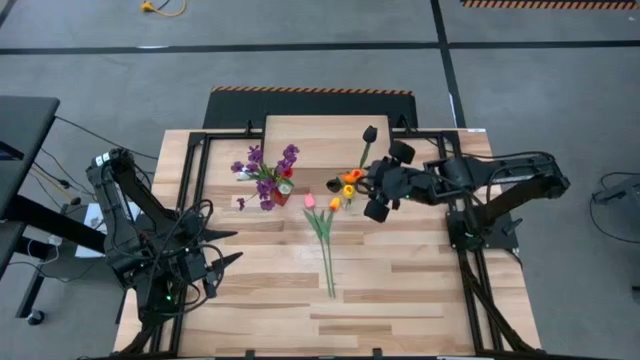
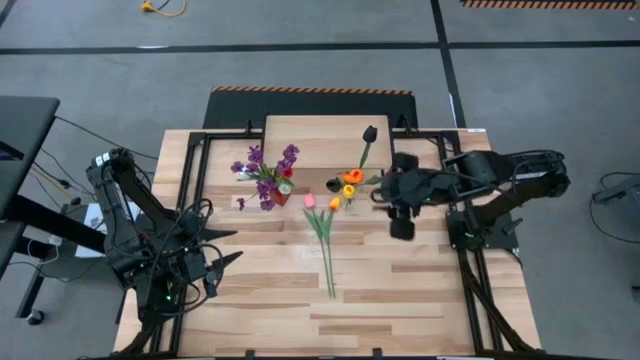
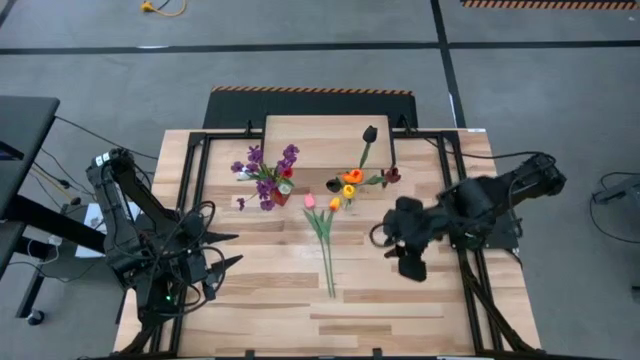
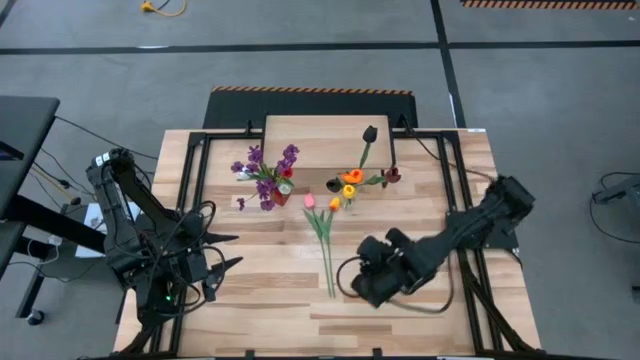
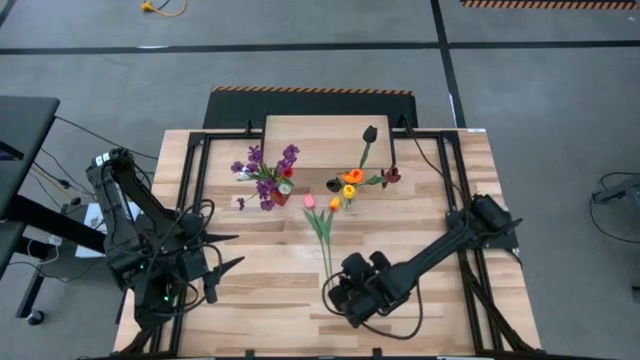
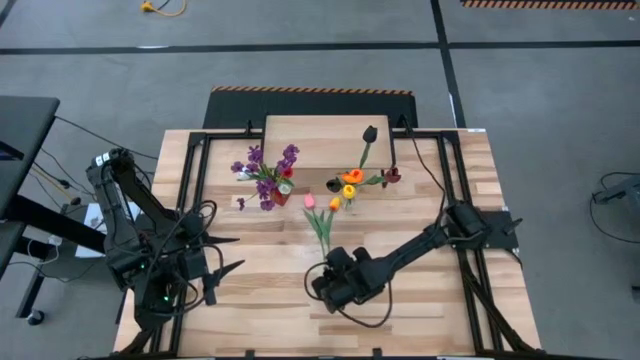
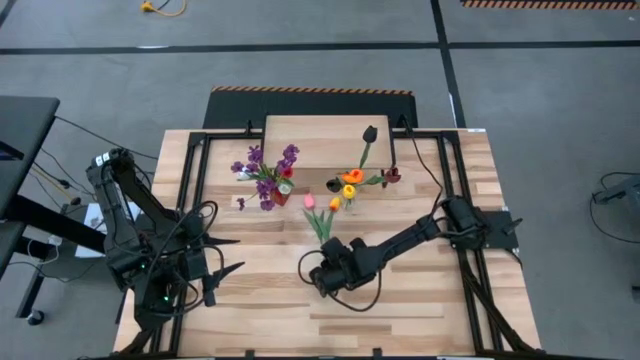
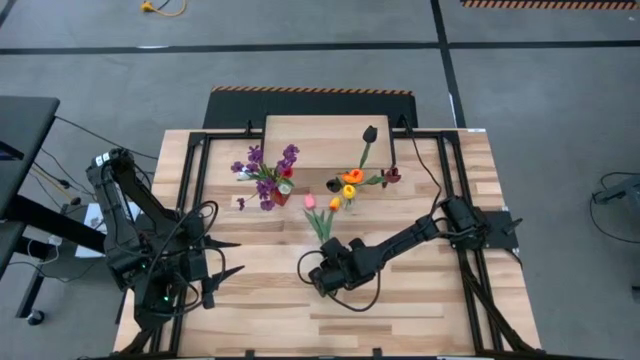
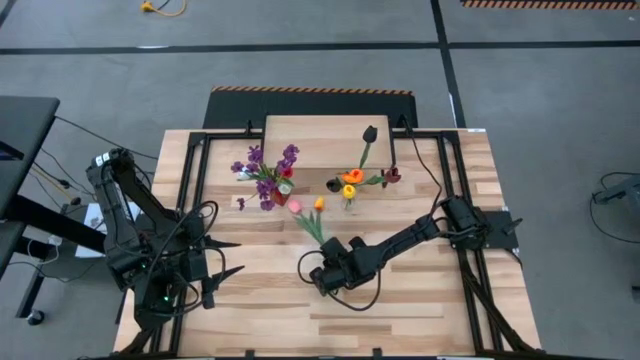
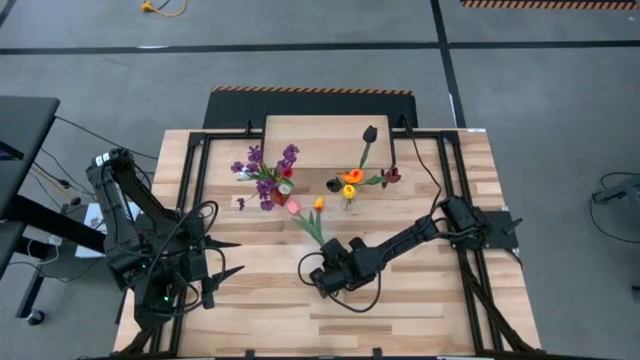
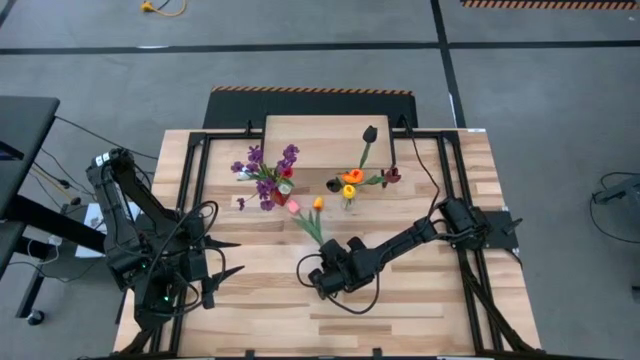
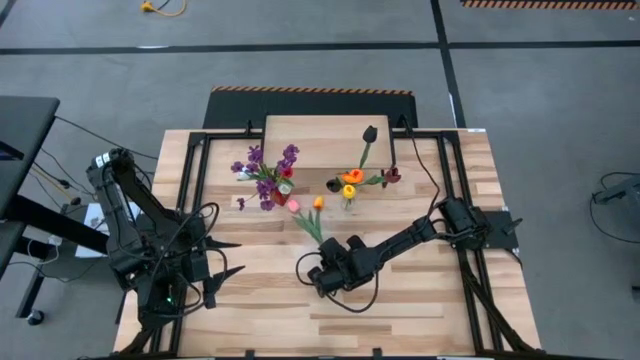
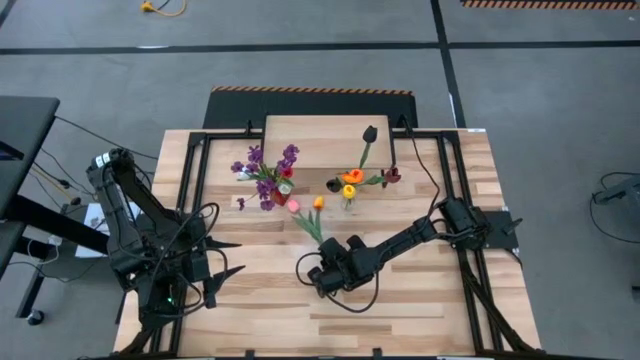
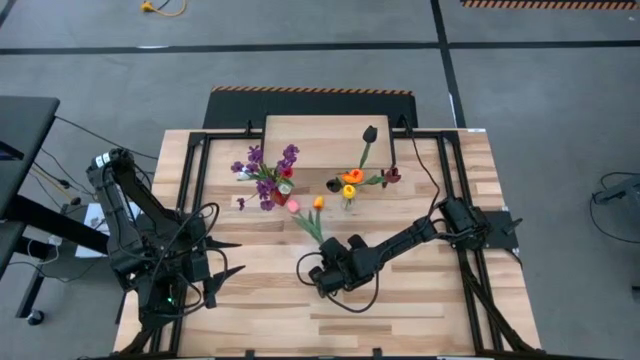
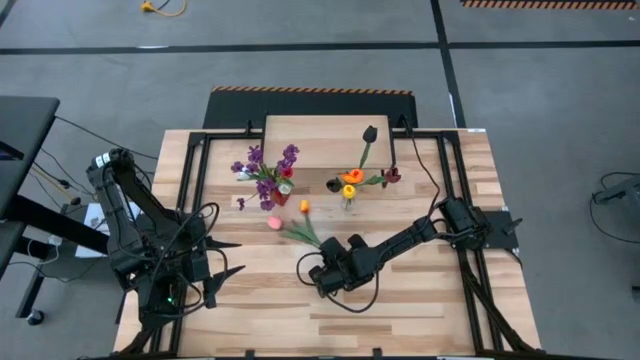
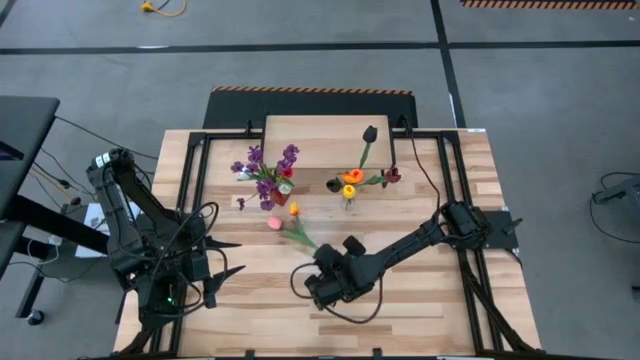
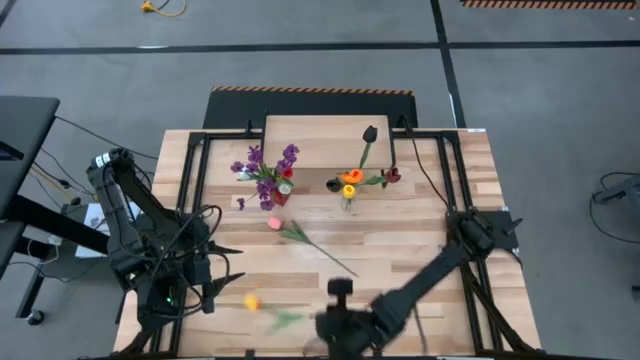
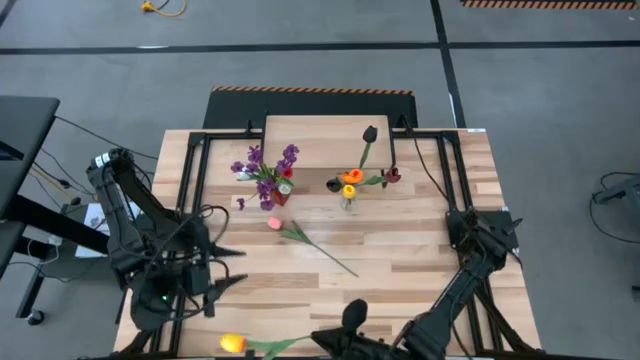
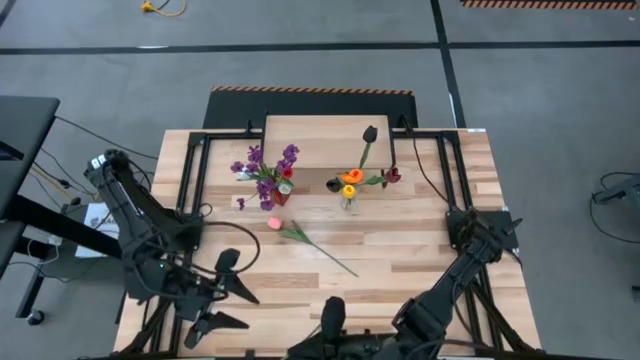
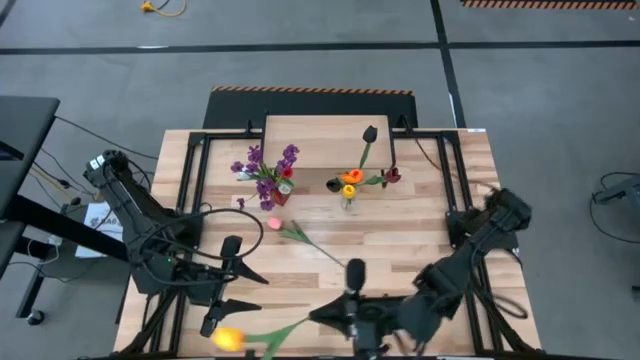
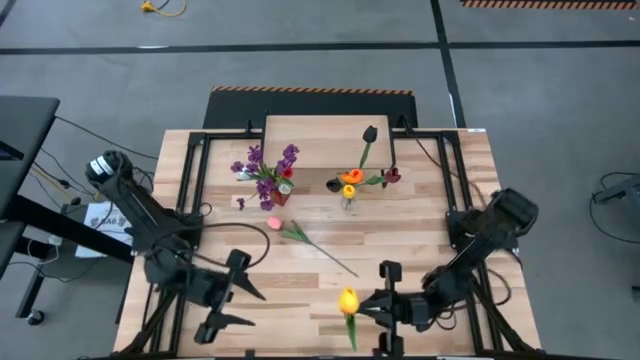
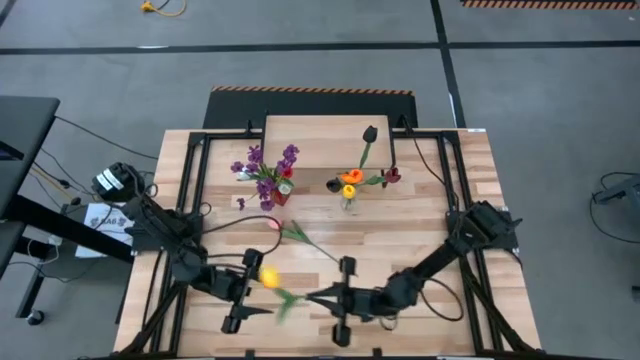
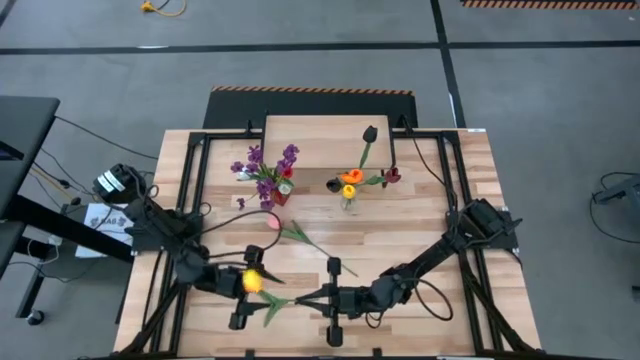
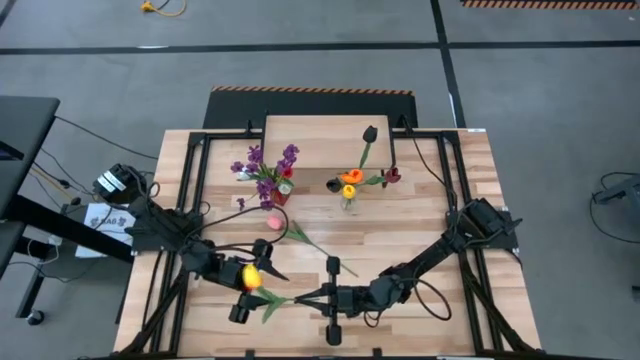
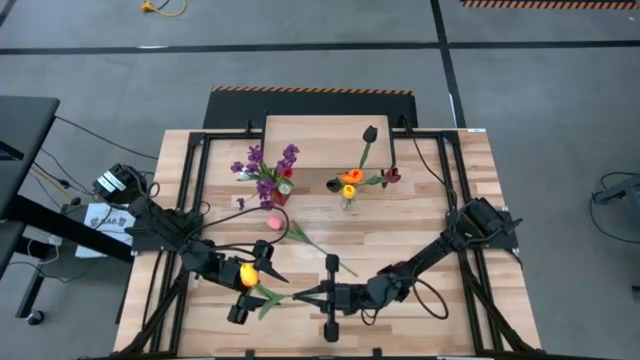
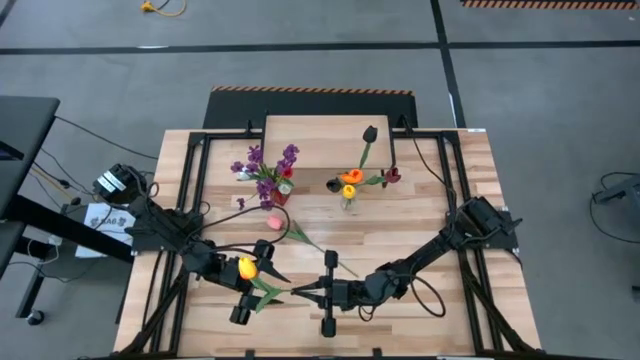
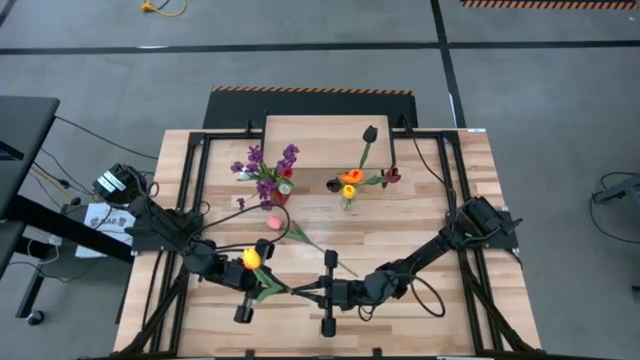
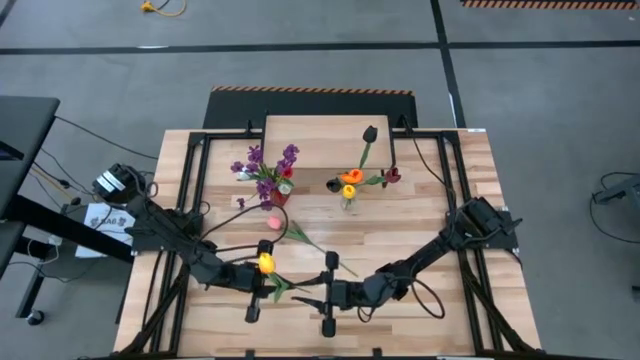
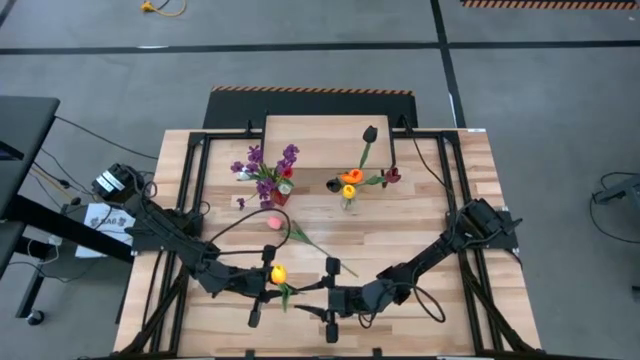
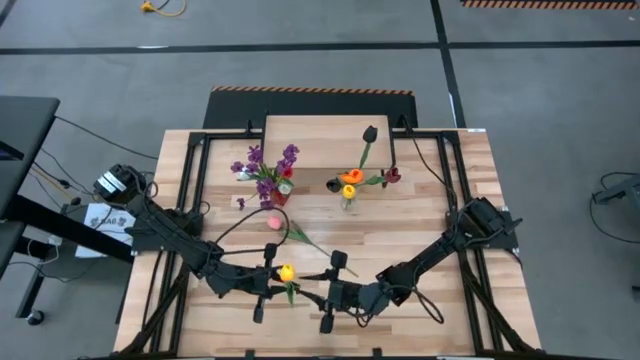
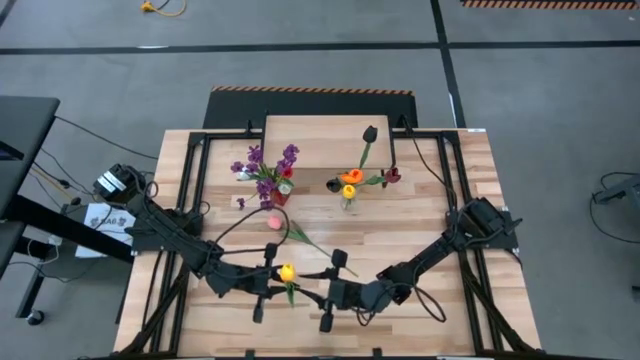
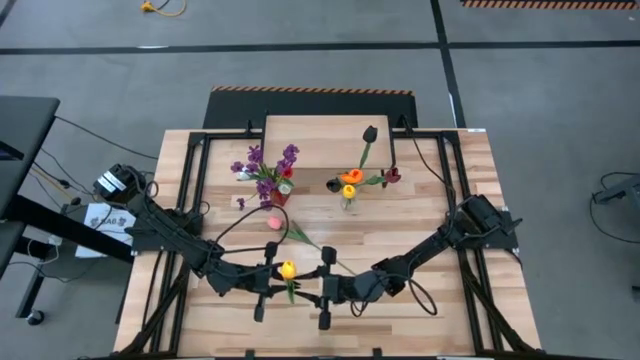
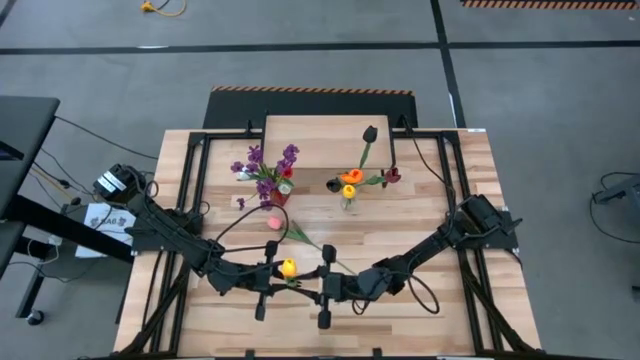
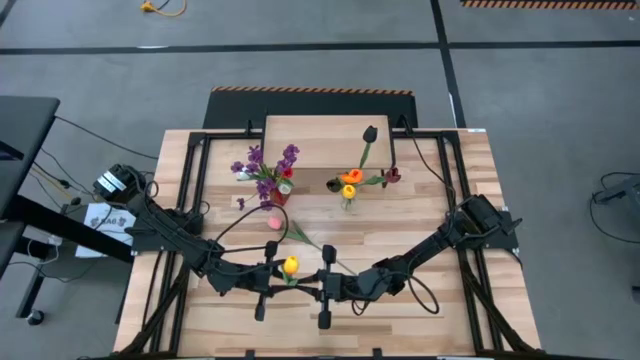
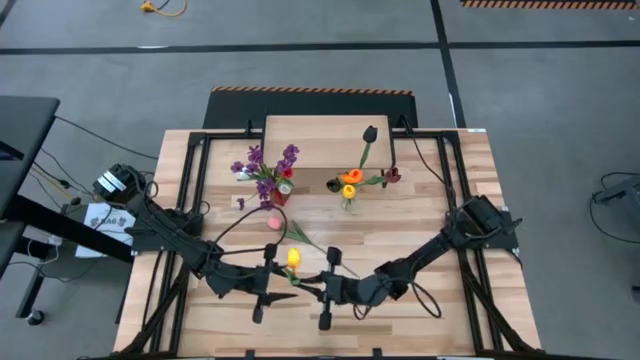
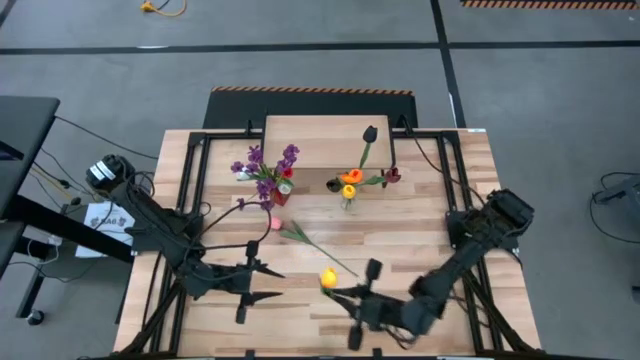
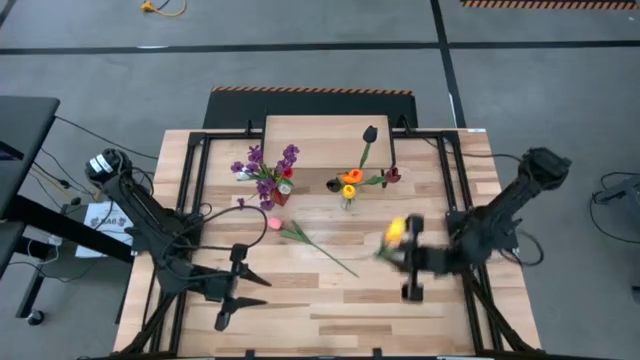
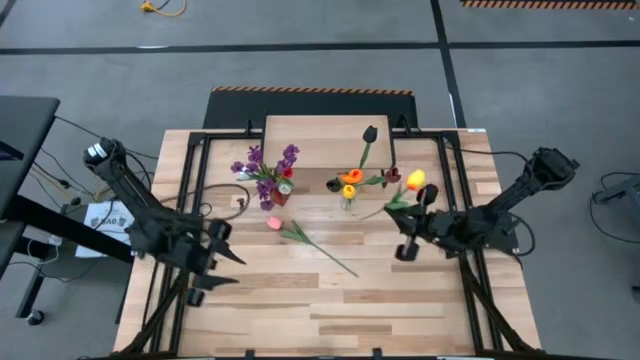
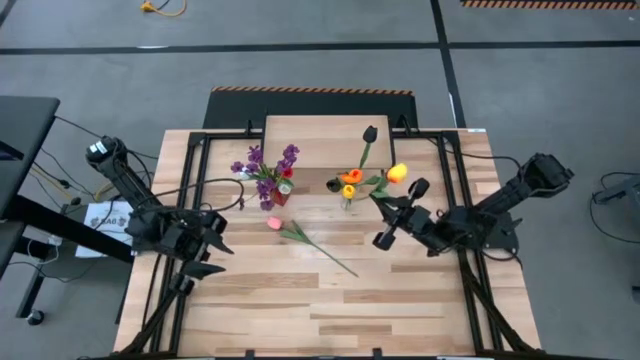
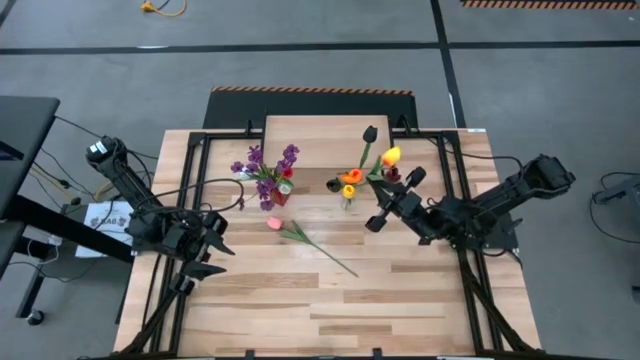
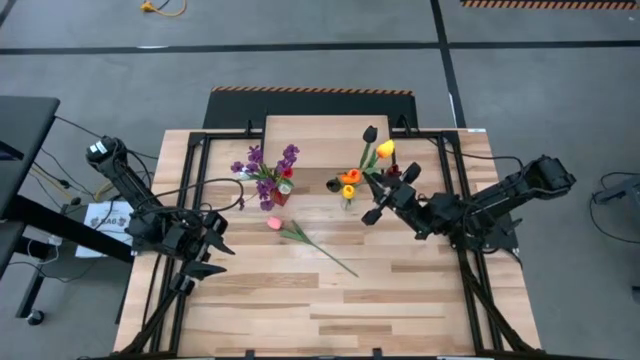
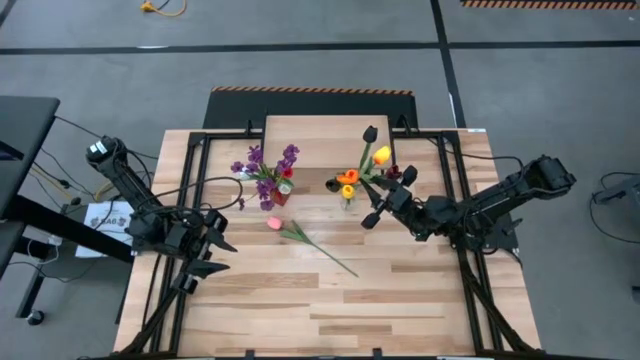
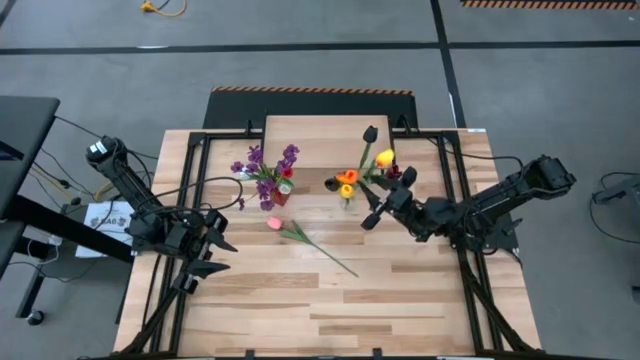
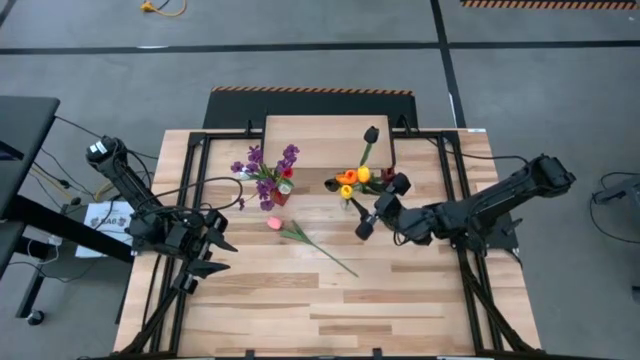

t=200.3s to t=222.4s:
Task: Pick and place flowers into a vace then onto a shelf
Put the orange flower into the transparent flower vase
